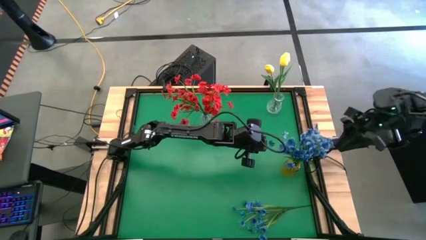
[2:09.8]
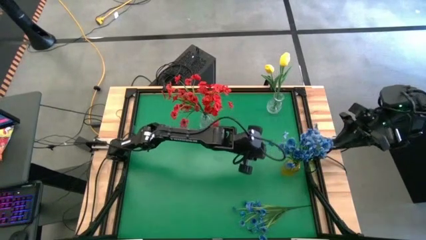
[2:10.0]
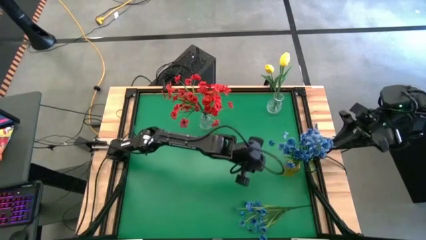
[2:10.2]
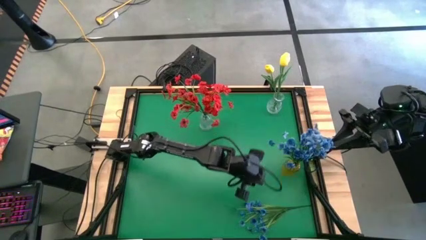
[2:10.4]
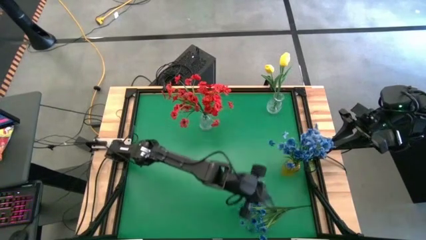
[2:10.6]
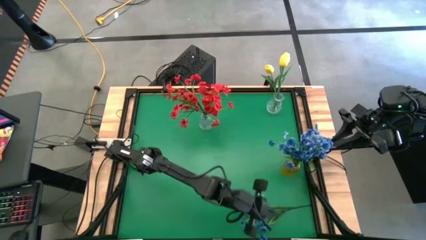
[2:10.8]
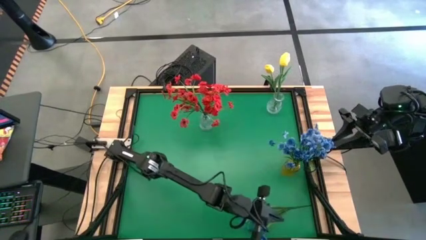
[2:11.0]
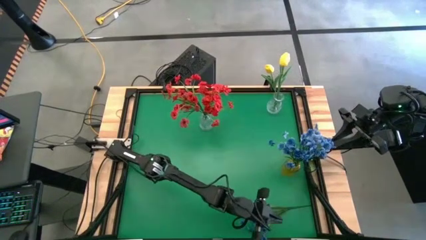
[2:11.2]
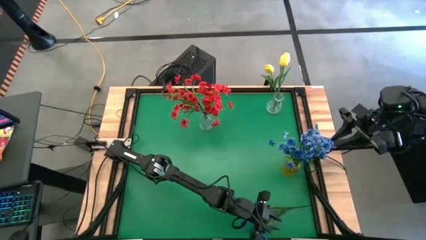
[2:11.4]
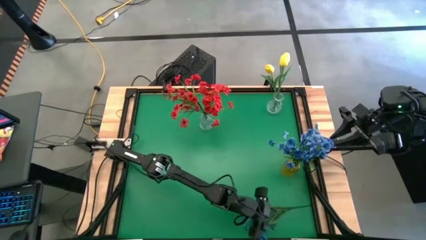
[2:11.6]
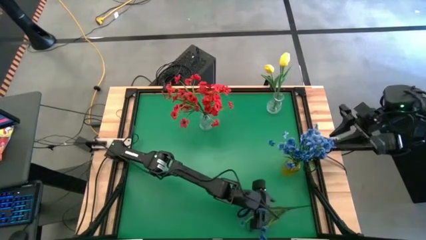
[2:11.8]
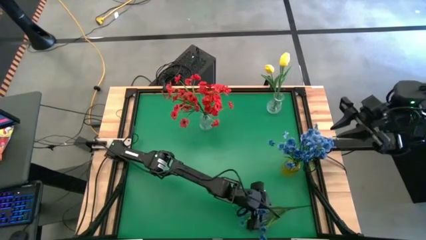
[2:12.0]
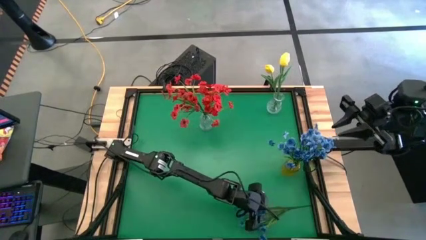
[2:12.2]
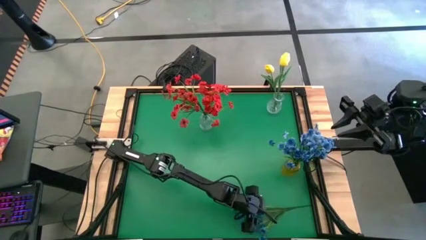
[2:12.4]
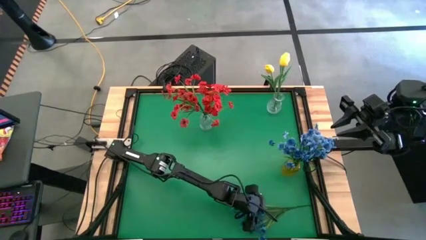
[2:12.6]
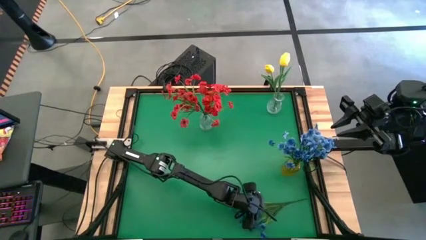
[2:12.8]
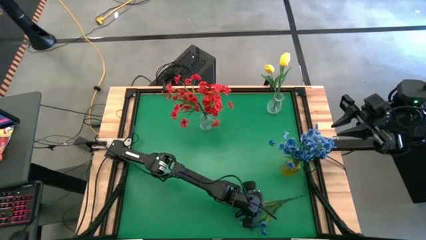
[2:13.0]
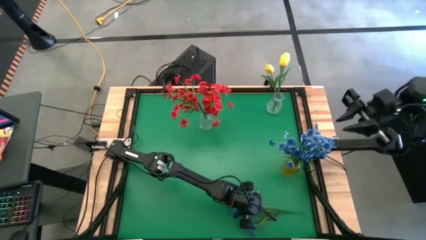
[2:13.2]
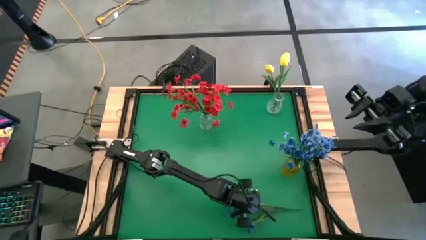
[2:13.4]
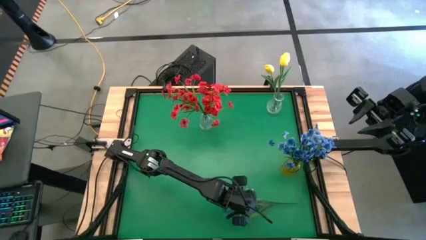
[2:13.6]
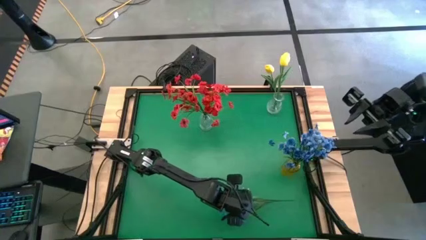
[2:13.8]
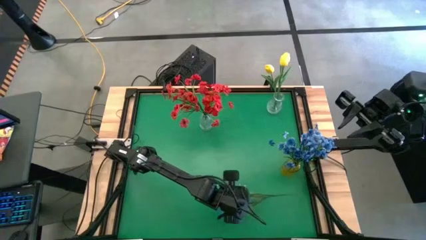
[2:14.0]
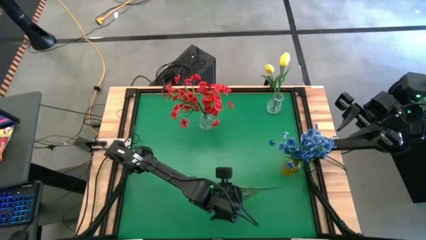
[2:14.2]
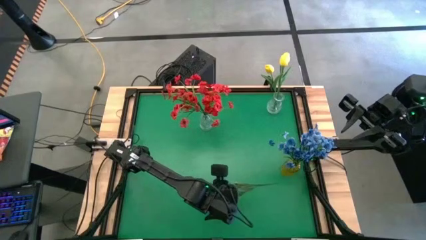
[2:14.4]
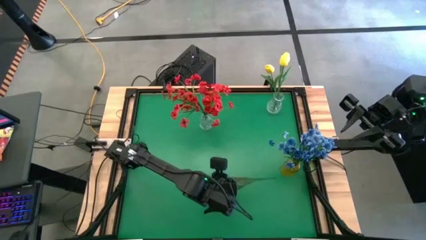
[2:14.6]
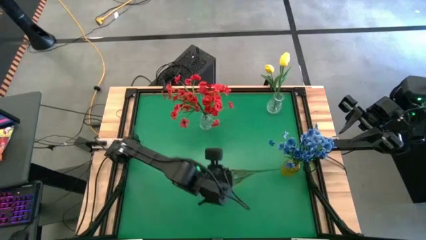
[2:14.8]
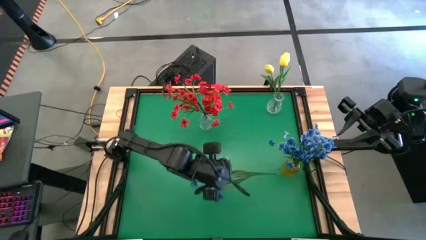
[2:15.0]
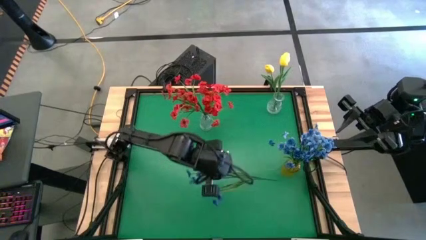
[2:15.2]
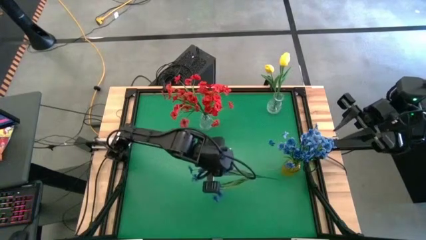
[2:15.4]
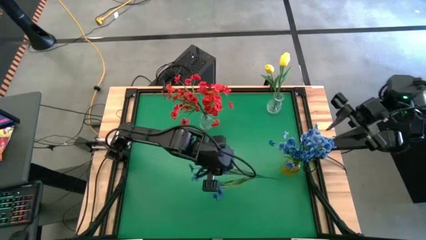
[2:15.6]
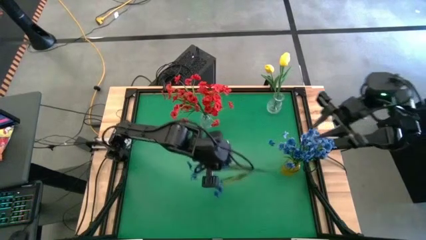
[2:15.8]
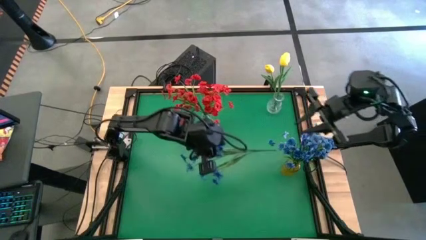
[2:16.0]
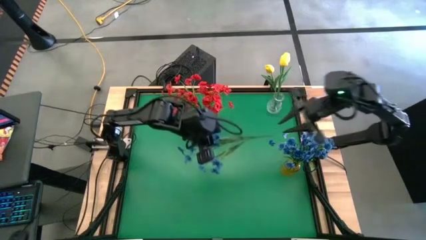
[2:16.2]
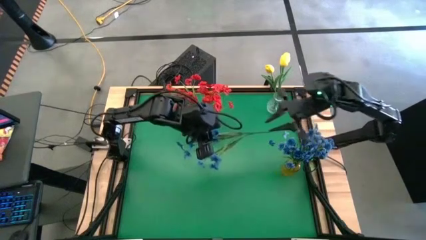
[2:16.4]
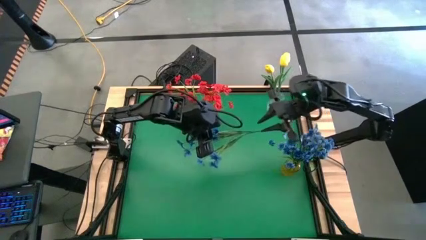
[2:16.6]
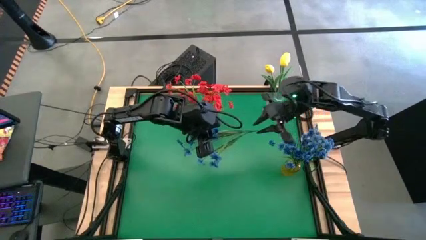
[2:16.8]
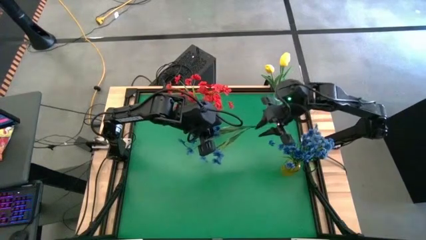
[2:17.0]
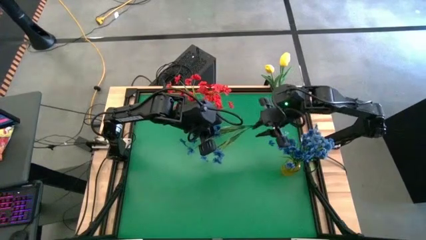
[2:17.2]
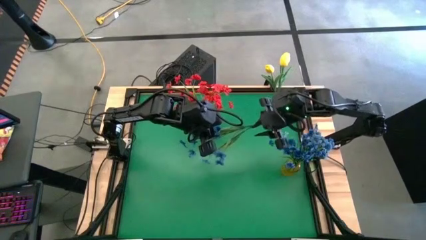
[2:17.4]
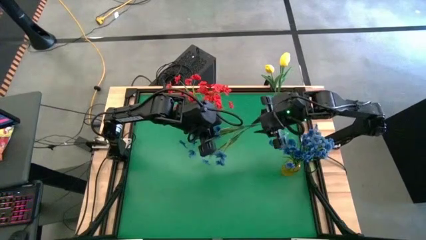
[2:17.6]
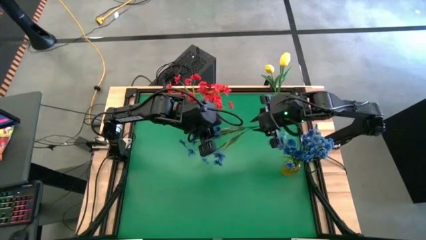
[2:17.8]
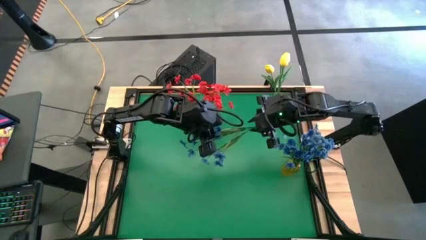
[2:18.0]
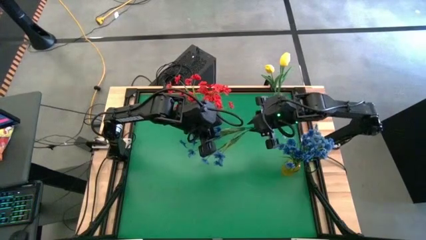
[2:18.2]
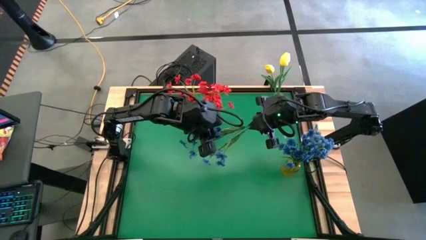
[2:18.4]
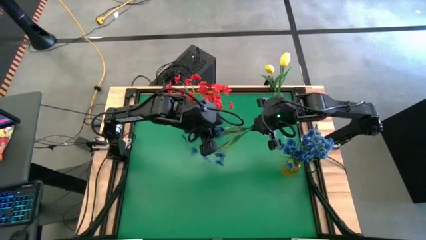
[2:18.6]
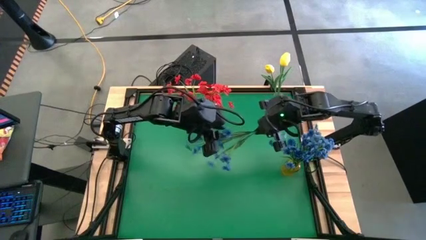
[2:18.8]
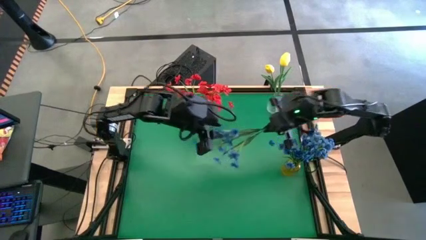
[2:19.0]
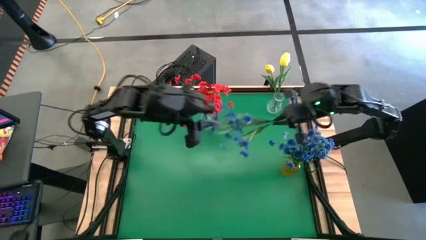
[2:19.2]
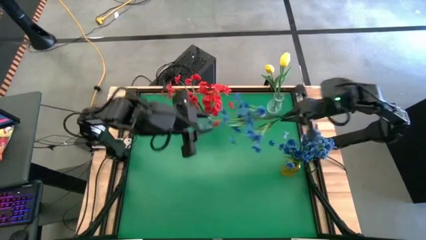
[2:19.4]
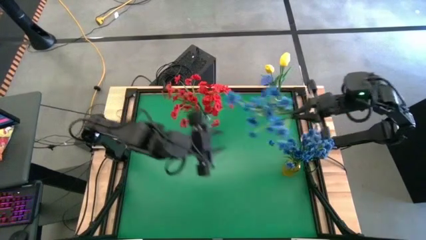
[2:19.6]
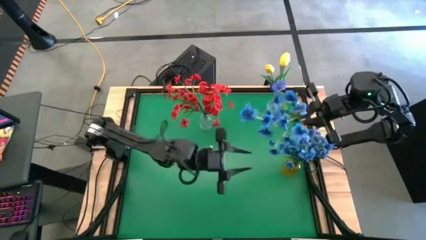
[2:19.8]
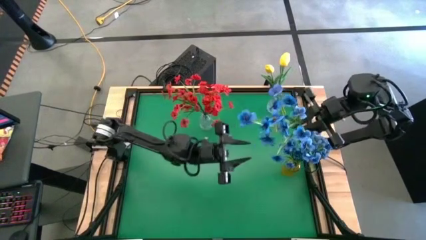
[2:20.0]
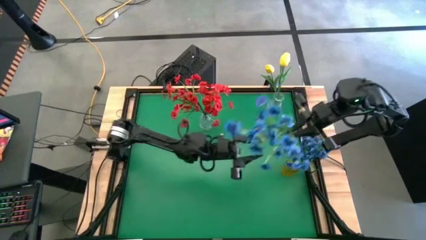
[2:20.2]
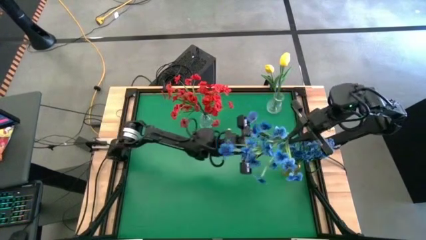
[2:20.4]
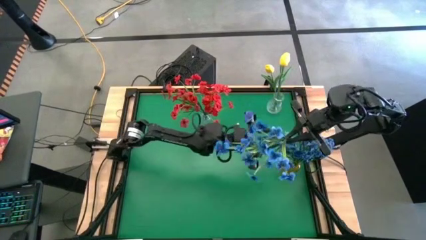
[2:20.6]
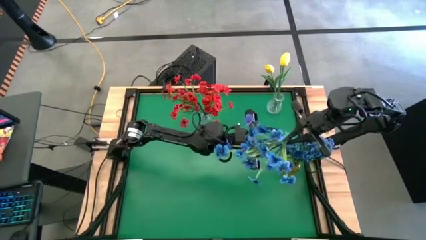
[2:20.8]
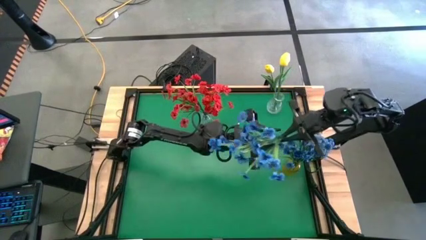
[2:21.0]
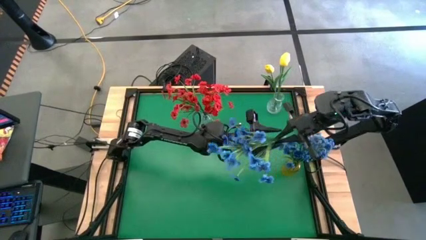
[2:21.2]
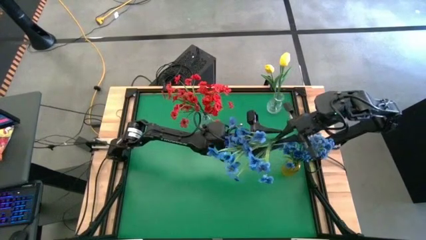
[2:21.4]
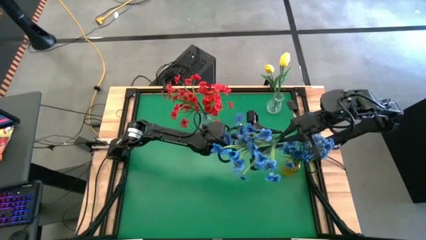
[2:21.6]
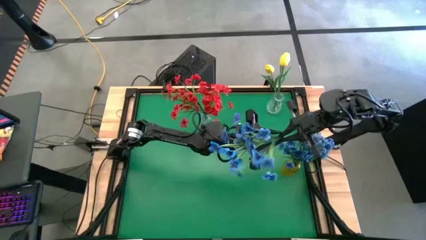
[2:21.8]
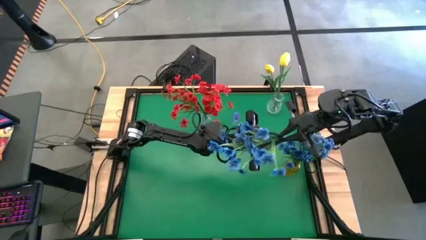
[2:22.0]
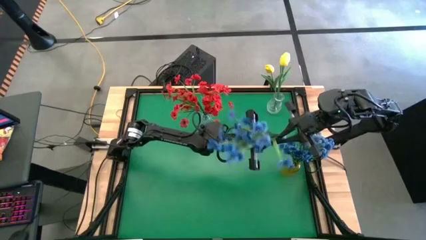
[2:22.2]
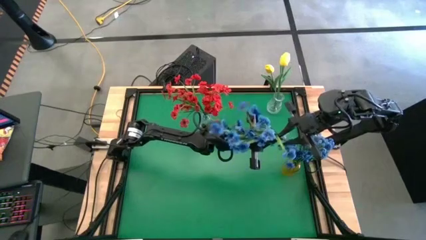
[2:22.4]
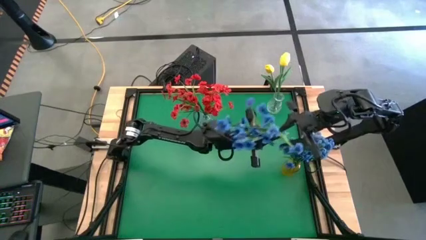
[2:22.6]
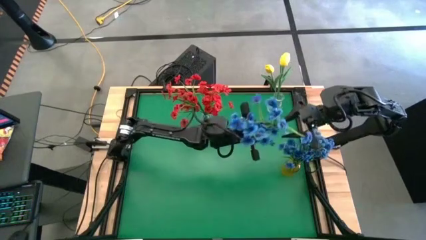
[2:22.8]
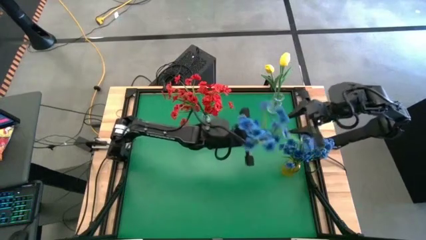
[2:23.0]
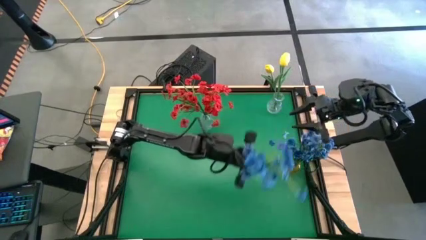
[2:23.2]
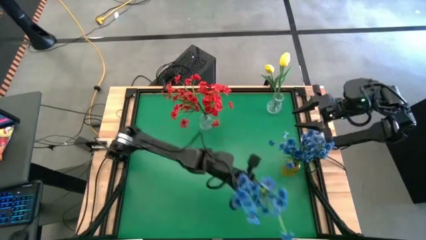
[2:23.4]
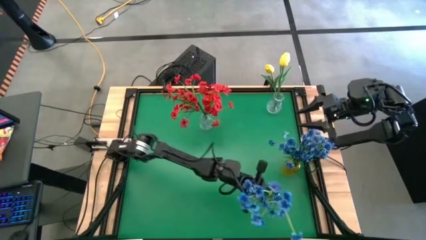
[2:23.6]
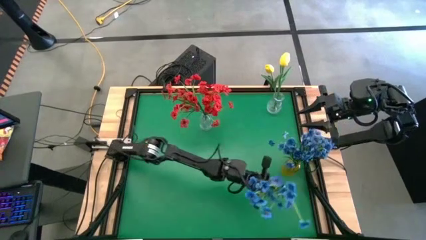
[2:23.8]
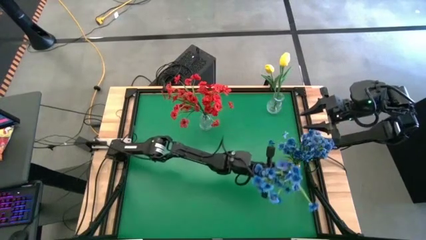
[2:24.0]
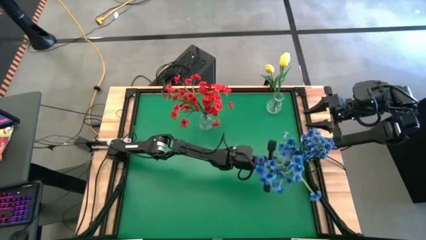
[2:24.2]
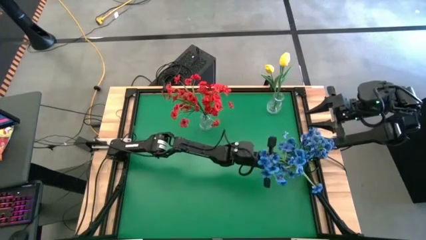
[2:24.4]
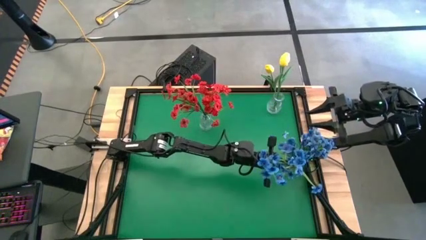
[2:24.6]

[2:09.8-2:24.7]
Task: Sort flowers into vase by color
Put the blue flowers into the yellow transparent vase
